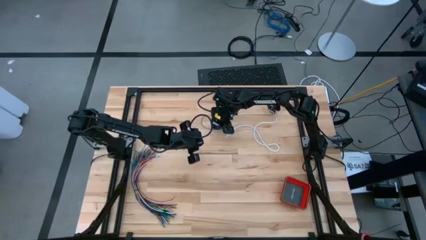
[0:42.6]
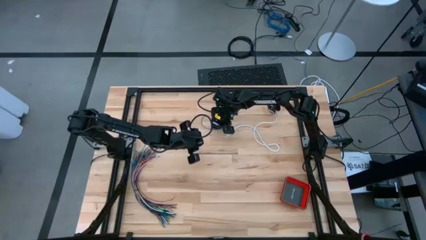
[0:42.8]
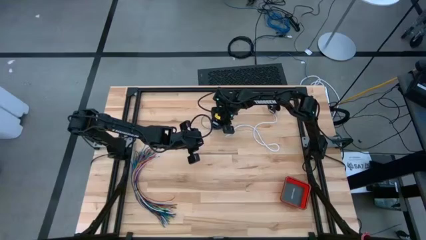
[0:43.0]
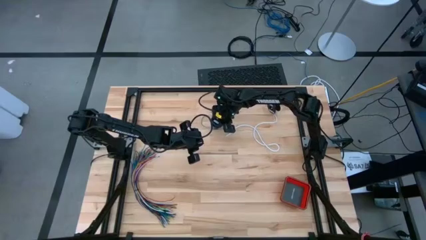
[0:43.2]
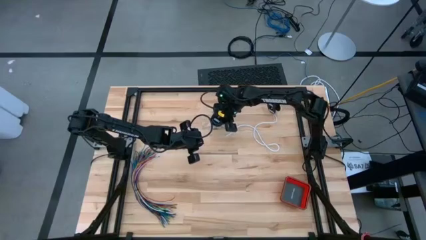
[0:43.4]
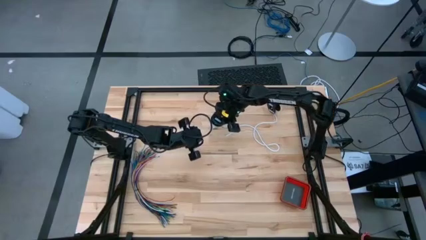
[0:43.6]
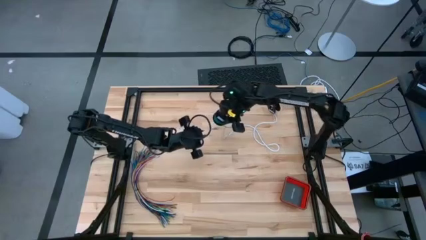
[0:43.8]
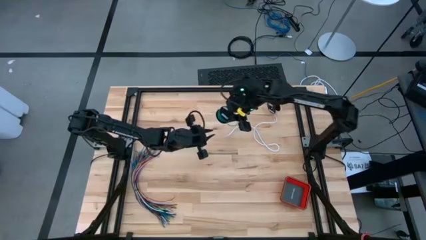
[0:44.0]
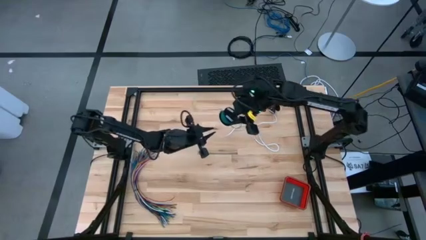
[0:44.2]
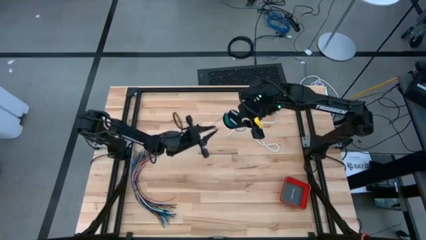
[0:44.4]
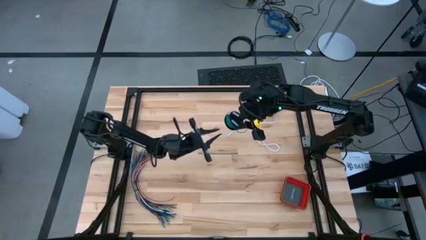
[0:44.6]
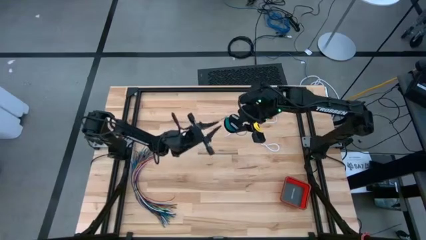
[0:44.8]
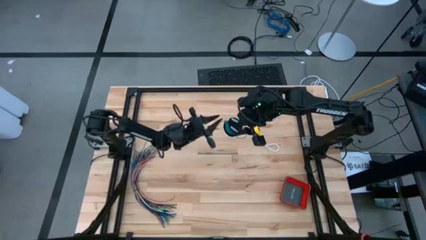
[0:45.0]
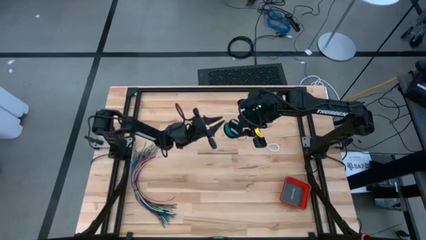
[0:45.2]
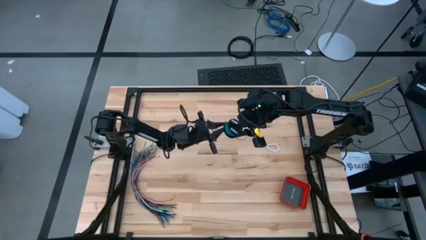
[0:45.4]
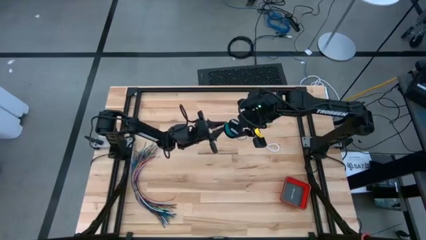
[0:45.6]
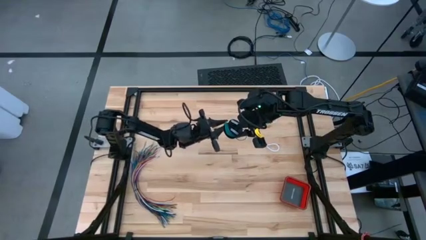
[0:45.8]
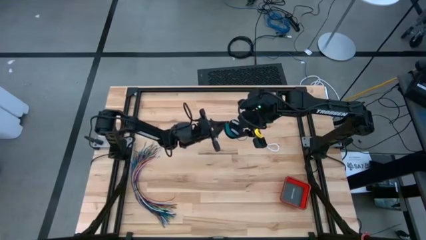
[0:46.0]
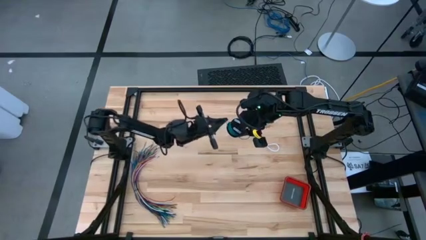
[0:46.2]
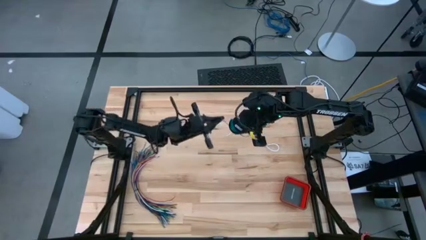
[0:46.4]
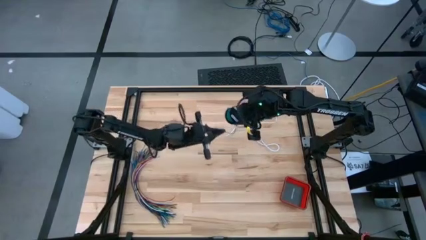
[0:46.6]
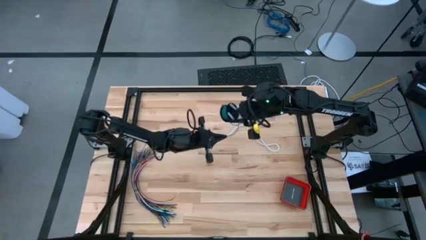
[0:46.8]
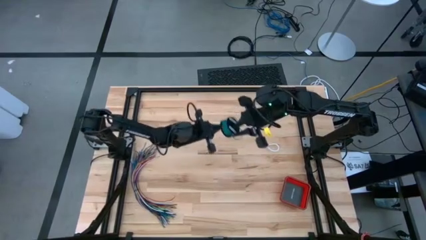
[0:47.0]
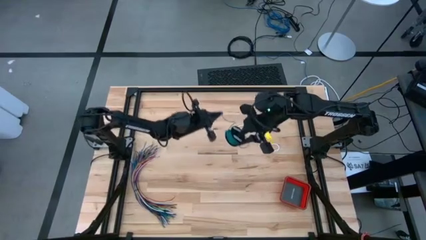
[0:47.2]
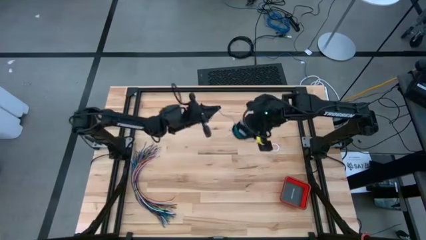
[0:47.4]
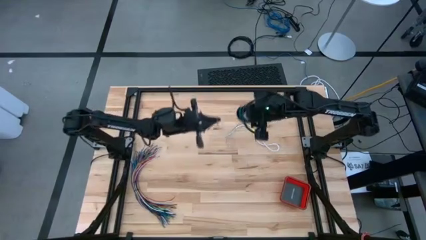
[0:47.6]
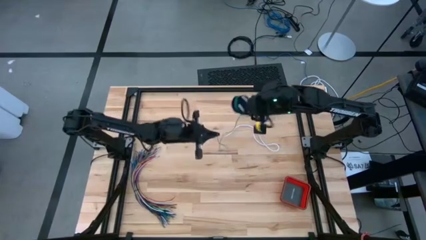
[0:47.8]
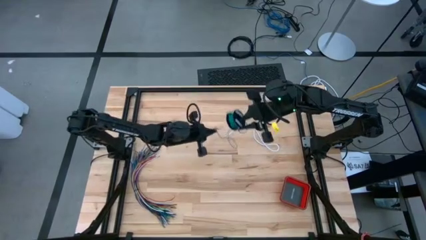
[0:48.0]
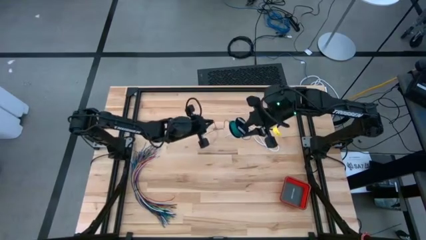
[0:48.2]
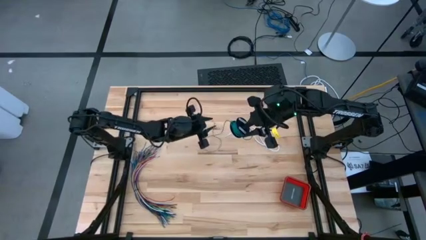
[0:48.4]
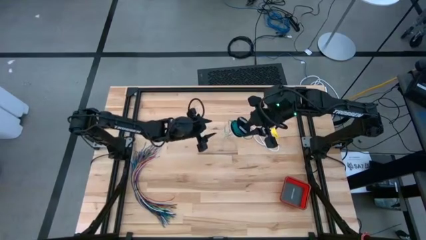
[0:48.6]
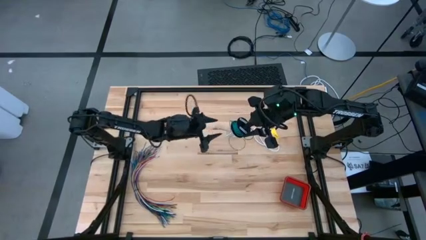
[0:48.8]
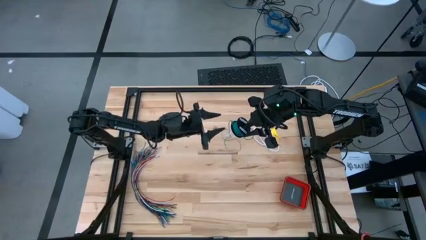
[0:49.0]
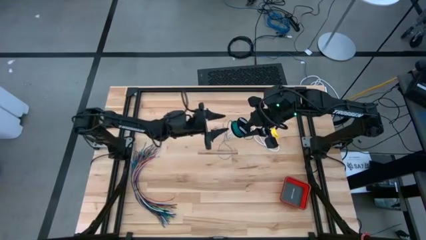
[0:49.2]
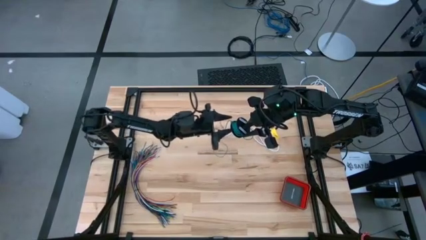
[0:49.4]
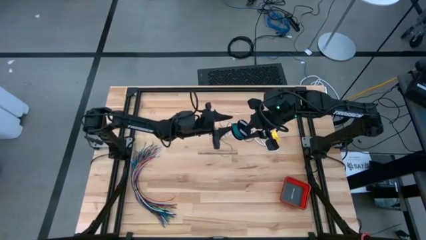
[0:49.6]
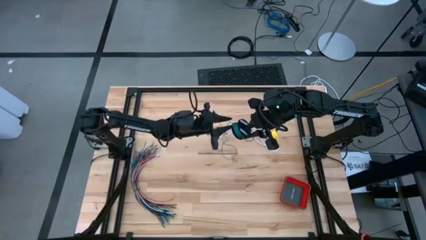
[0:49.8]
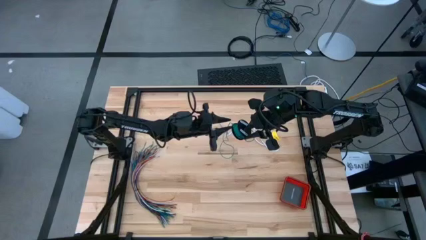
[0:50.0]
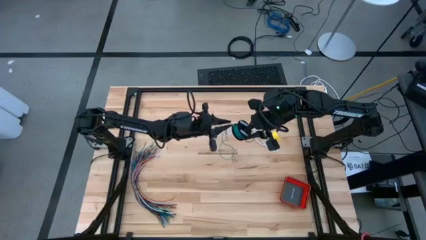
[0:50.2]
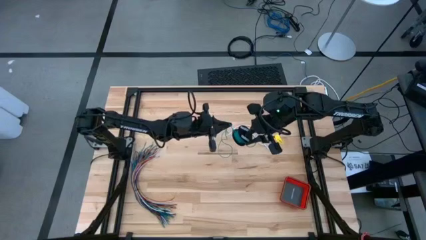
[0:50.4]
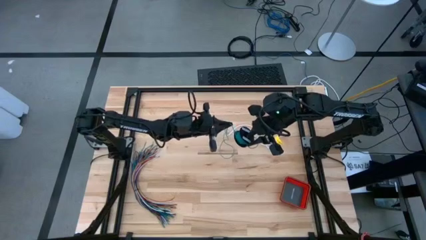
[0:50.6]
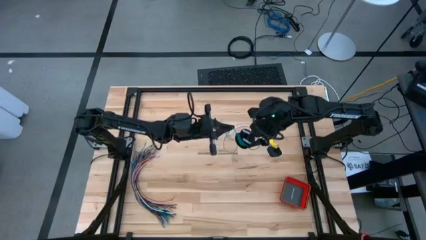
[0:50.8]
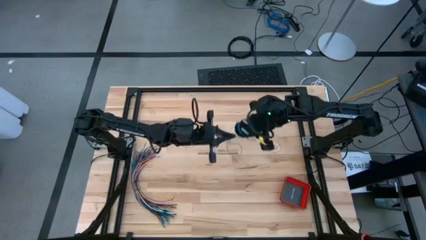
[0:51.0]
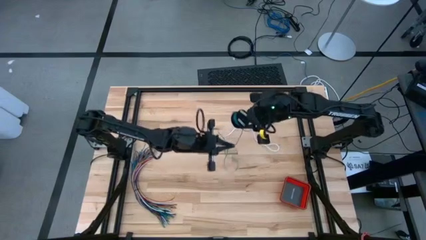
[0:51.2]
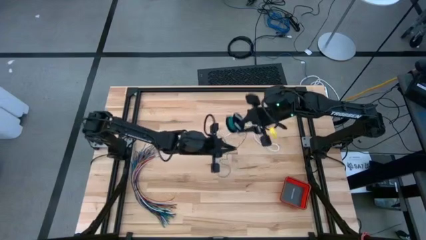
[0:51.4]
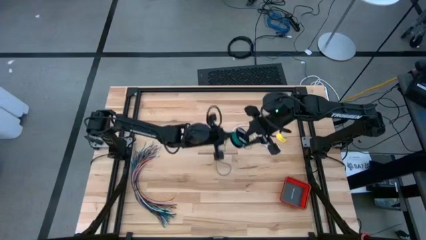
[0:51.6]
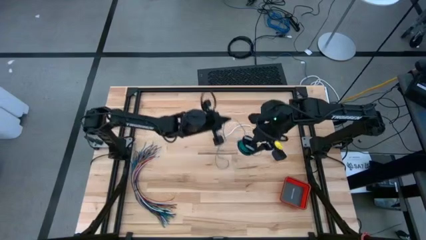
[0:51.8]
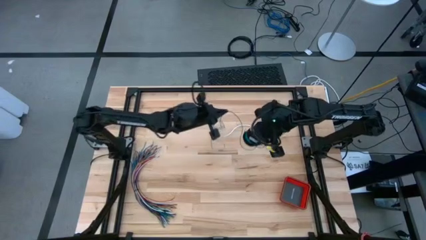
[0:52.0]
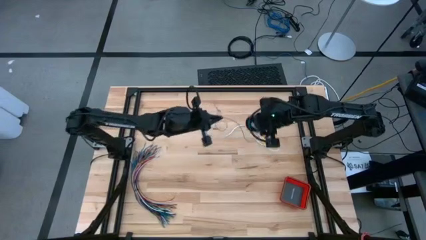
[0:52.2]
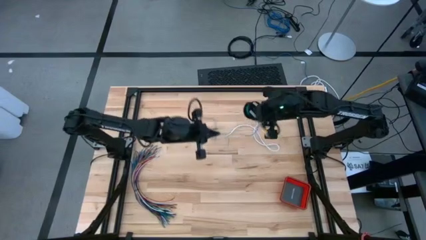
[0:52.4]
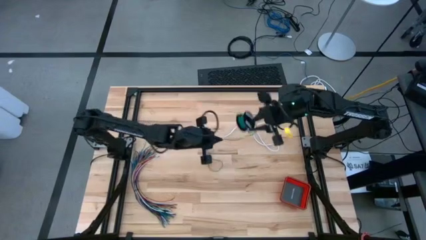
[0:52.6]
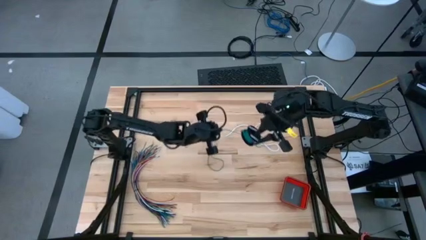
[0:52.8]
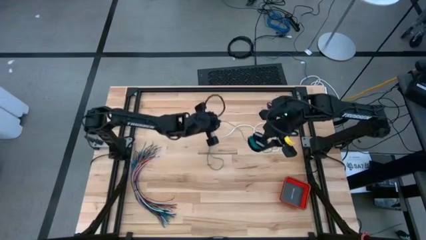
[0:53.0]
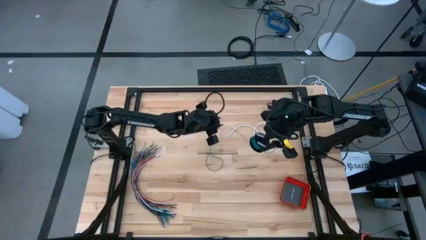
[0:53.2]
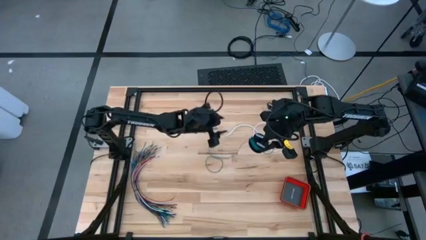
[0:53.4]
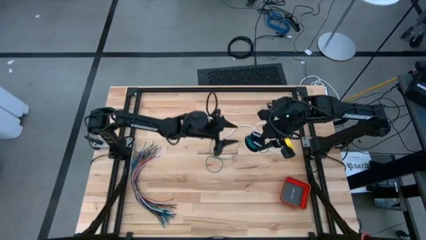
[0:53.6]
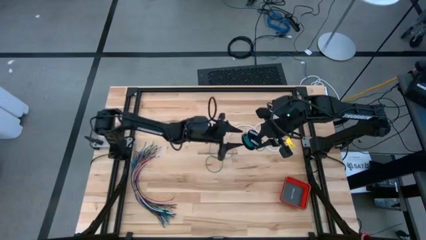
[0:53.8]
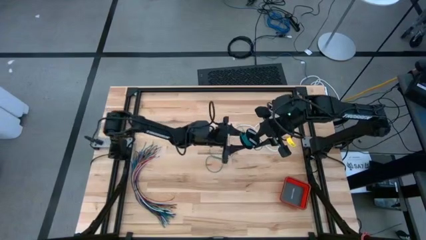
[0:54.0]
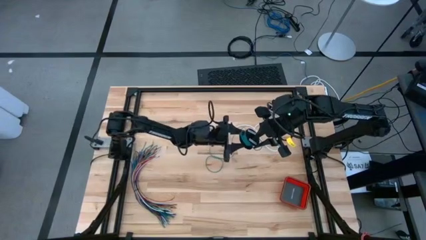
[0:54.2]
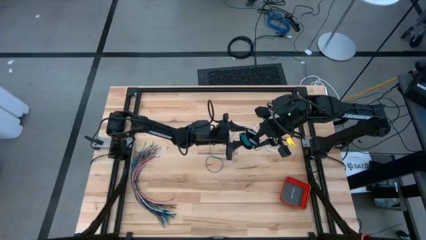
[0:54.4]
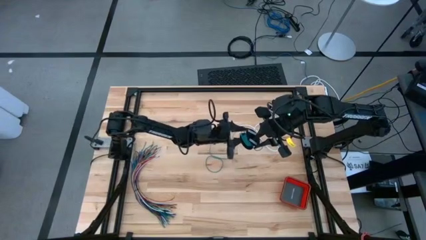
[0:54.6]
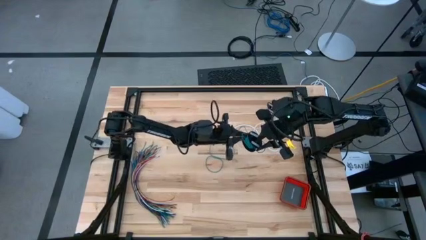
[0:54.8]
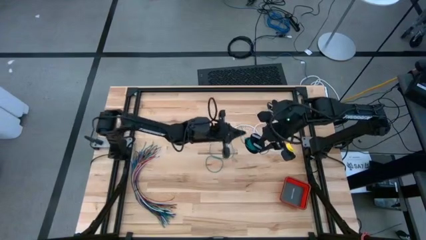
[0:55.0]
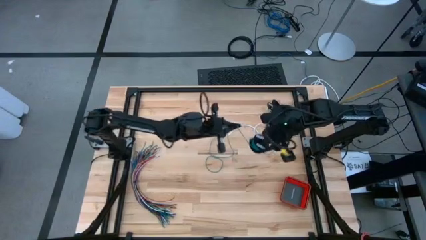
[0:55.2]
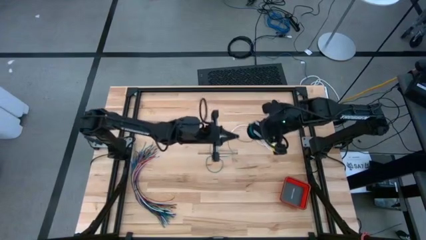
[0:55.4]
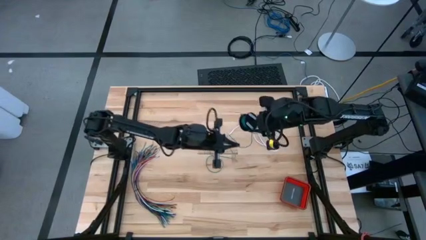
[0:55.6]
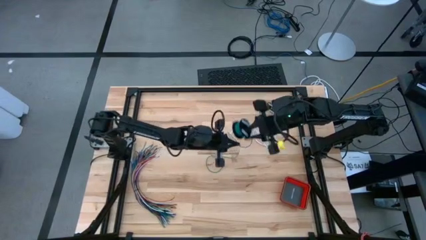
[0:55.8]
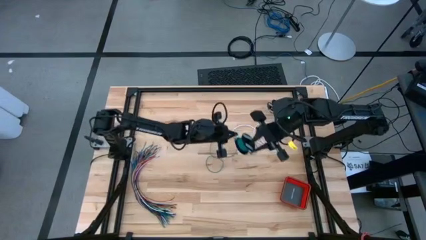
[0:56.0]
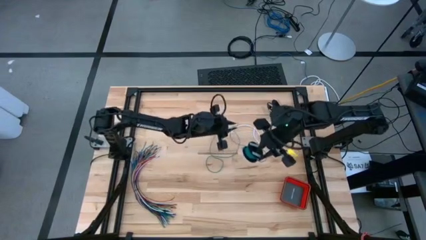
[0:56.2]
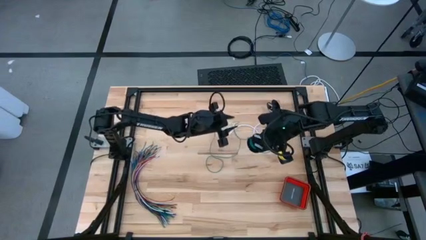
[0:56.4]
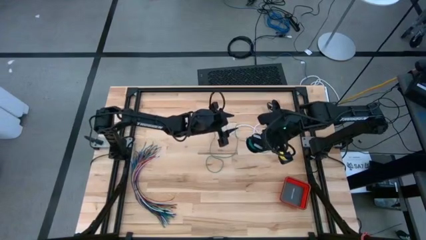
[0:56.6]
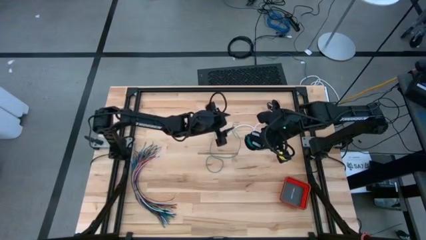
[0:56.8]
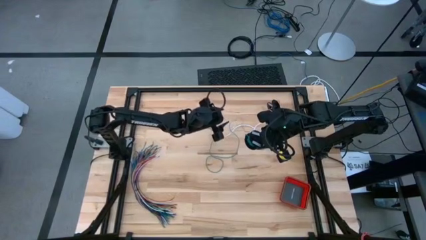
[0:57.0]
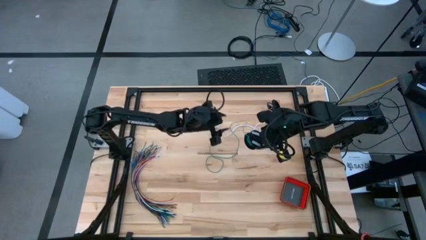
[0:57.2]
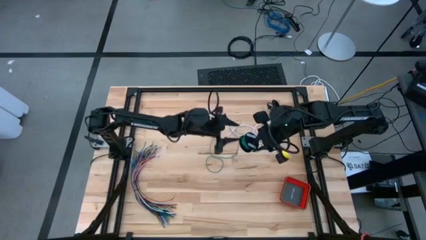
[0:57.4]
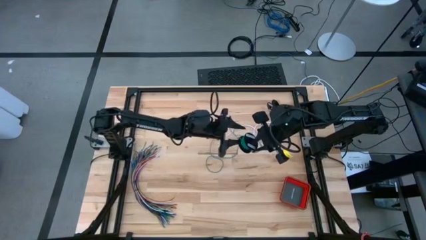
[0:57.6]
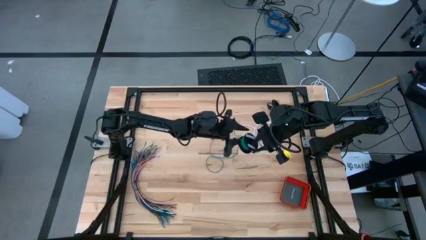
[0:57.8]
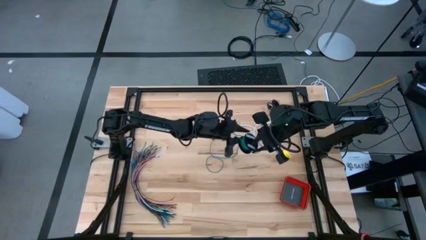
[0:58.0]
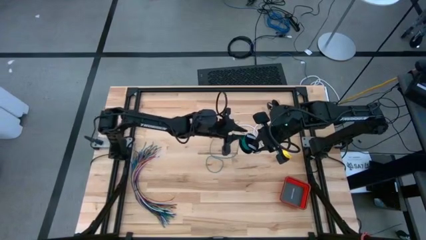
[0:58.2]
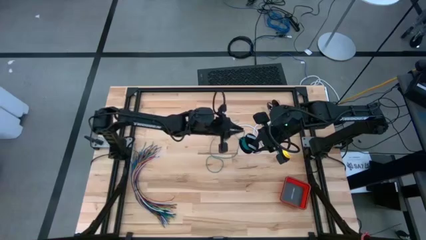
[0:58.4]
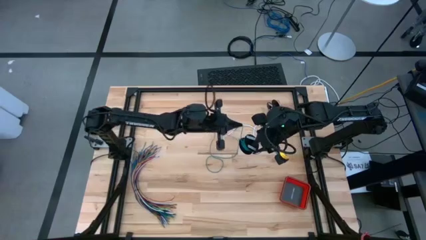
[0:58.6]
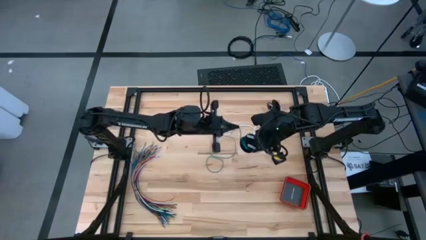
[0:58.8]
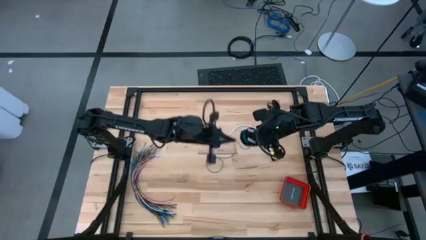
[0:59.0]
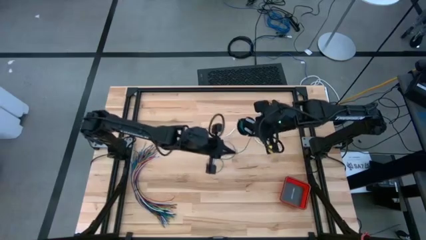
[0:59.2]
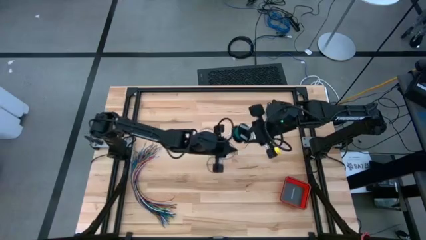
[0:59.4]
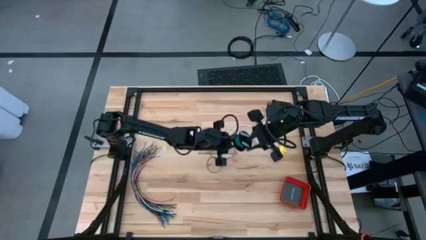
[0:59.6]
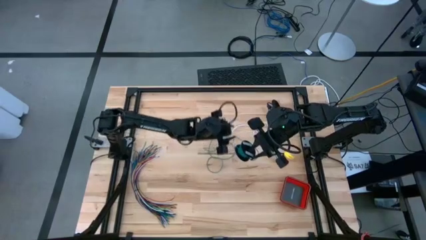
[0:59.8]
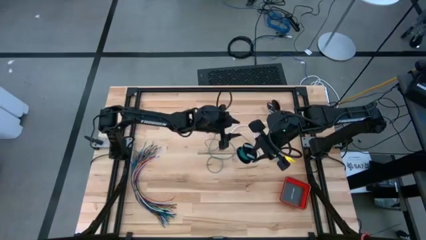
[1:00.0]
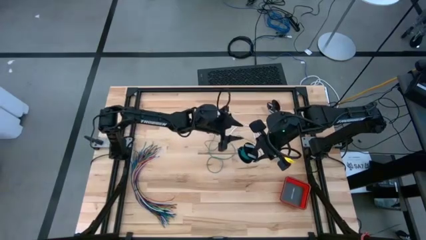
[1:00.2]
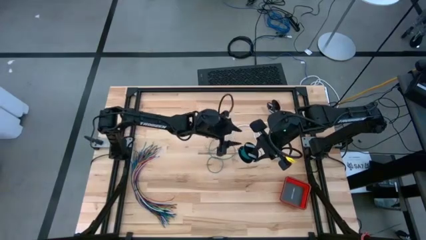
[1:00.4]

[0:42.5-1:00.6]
Task: Coil cords
Uncoil the green wire from the spool
